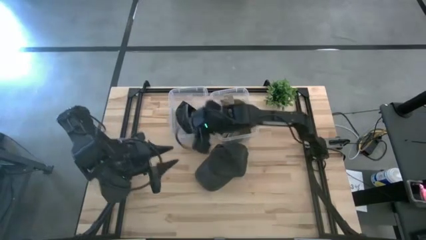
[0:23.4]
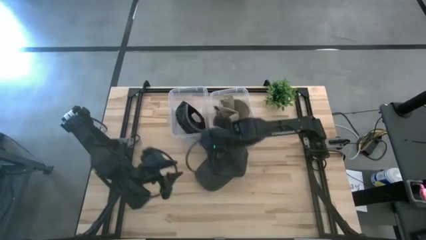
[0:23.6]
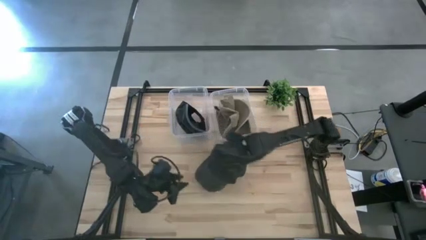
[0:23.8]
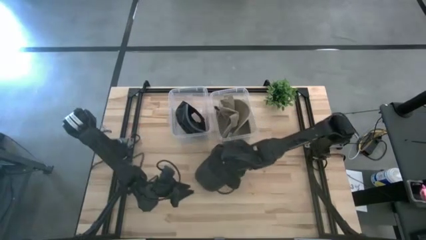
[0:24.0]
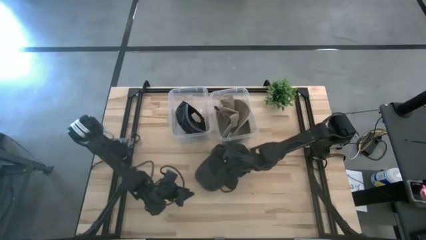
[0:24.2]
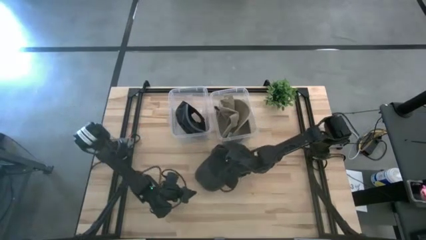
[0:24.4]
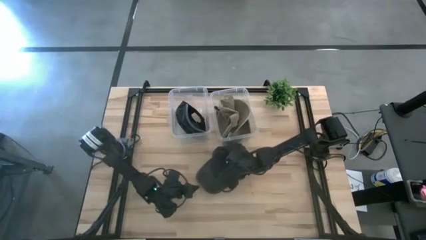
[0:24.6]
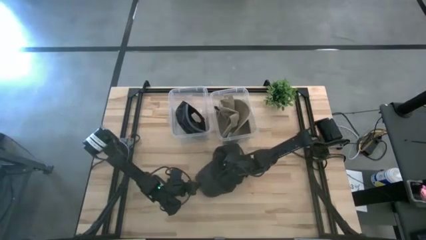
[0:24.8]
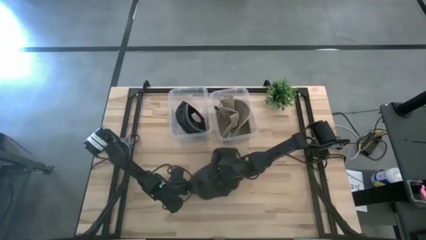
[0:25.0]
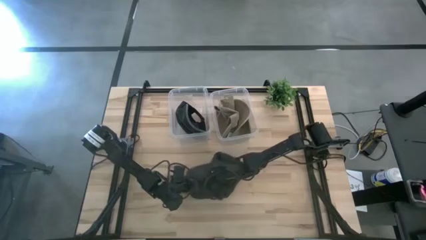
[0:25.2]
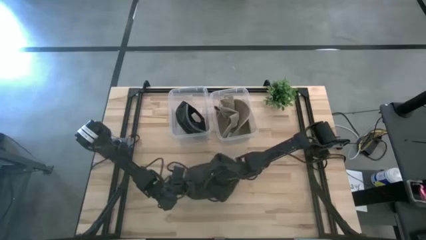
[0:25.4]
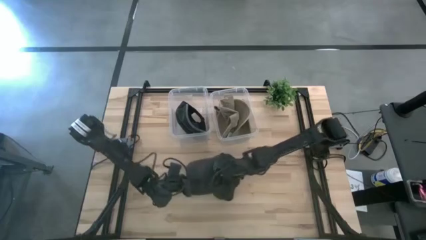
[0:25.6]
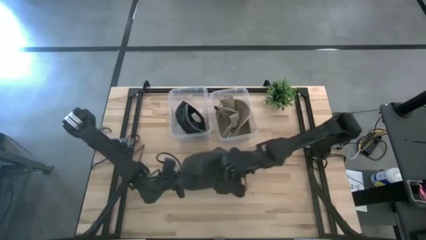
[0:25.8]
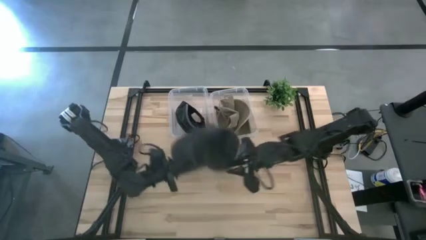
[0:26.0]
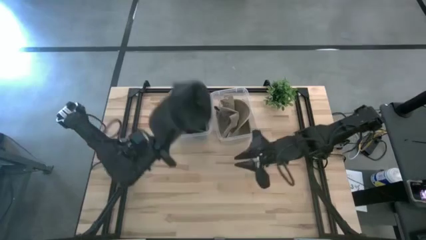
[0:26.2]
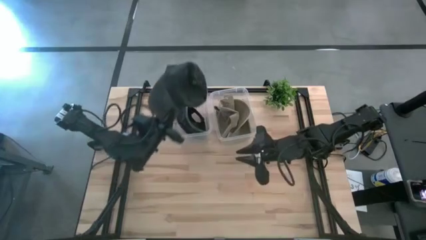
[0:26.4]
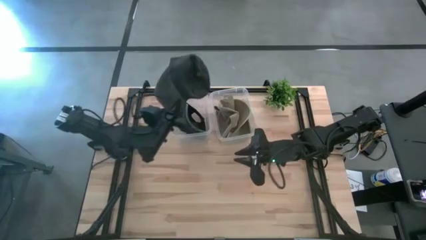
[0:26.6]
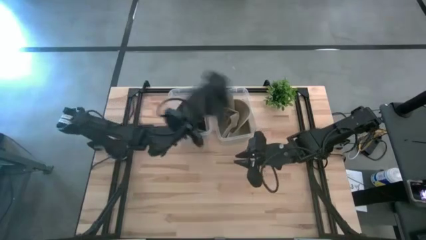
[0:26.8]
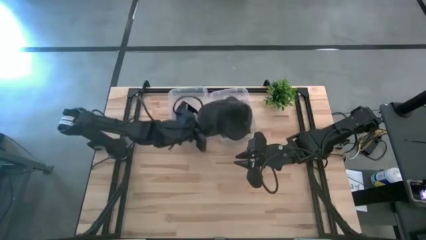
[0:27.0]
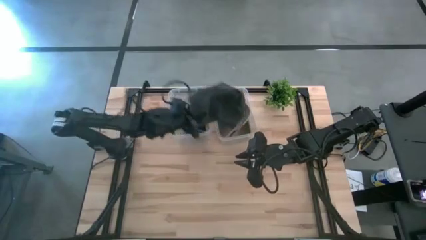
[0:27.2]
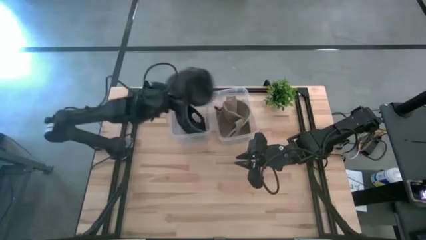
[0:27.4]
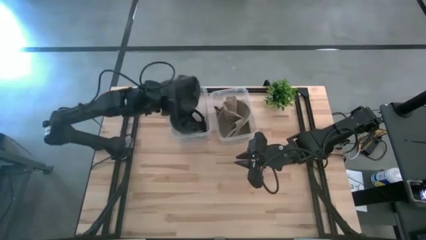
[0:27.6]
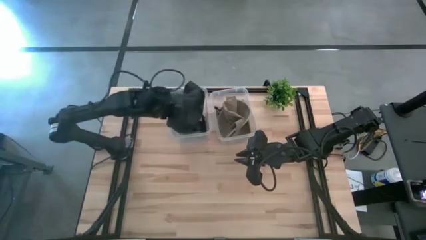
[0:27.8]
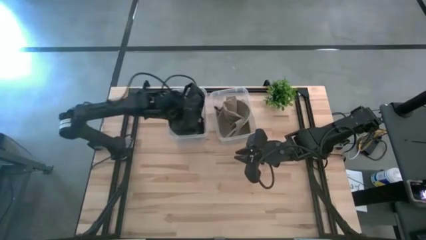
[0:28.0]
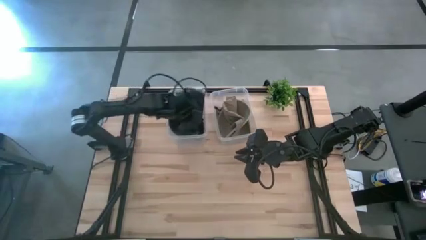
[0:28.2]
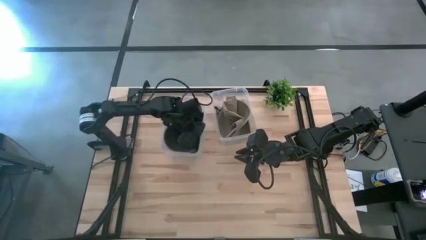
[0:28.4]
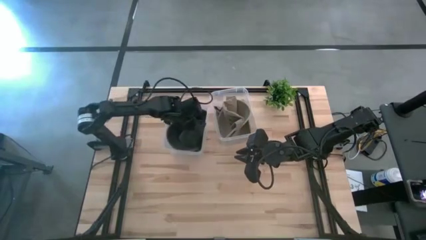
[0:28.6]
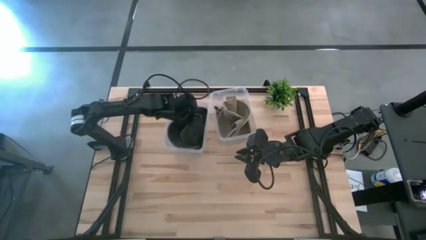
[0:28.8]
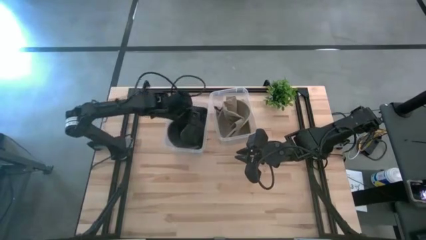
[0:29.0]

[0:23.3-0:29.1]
Task: Pick & Place hat
Put the black cap into the left transparent bin

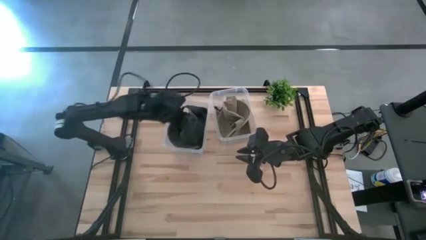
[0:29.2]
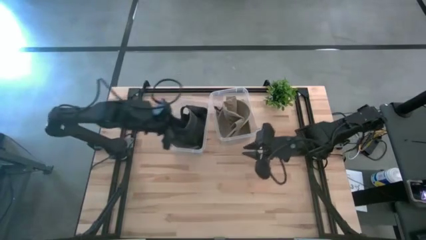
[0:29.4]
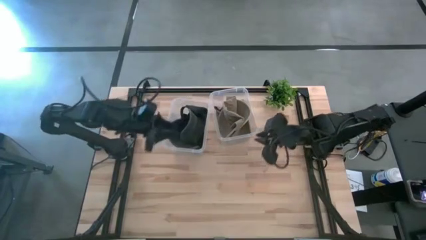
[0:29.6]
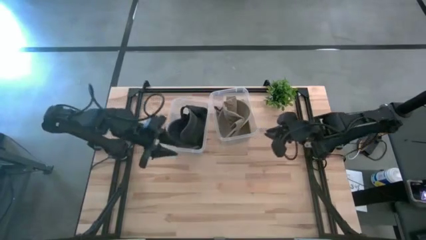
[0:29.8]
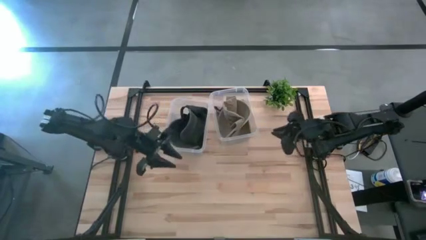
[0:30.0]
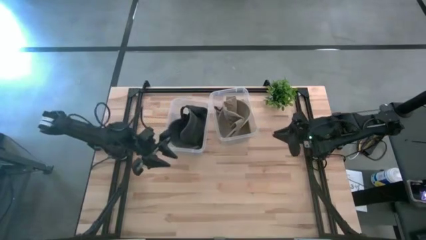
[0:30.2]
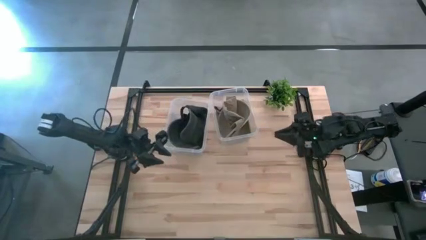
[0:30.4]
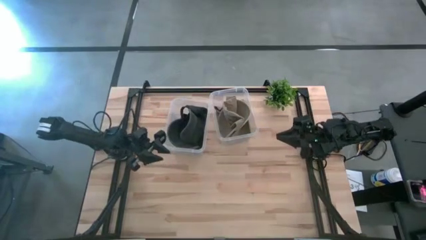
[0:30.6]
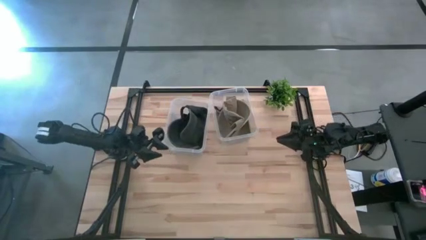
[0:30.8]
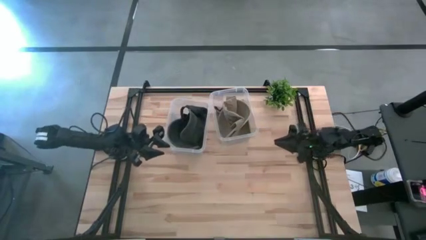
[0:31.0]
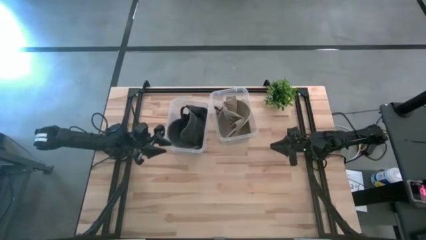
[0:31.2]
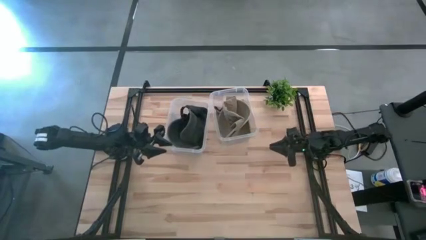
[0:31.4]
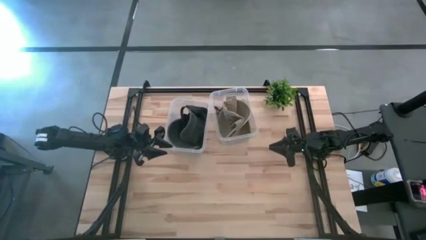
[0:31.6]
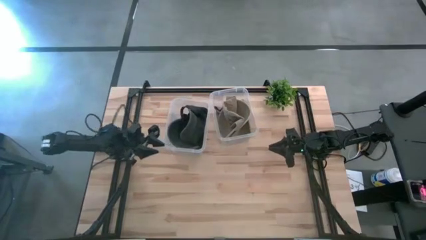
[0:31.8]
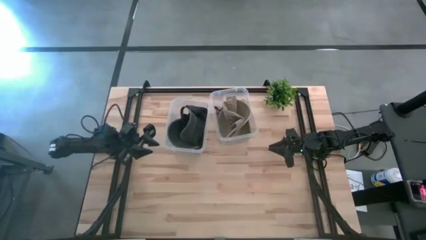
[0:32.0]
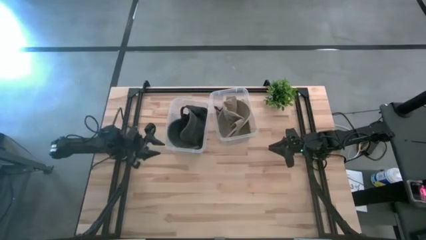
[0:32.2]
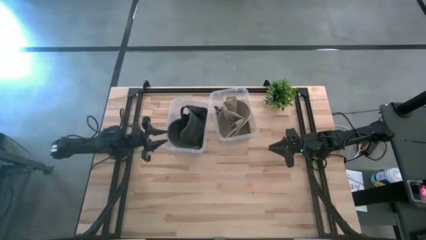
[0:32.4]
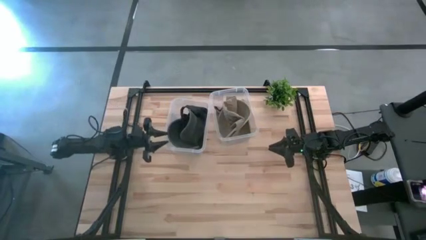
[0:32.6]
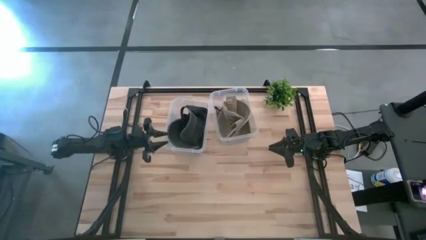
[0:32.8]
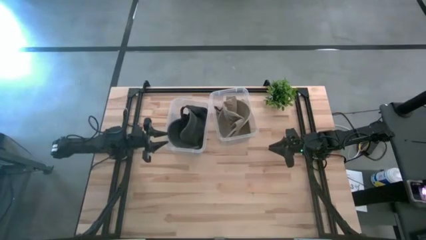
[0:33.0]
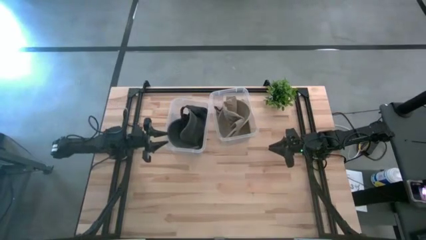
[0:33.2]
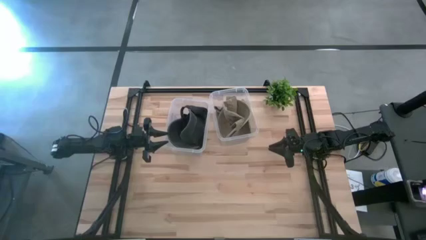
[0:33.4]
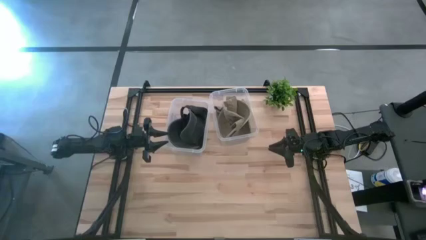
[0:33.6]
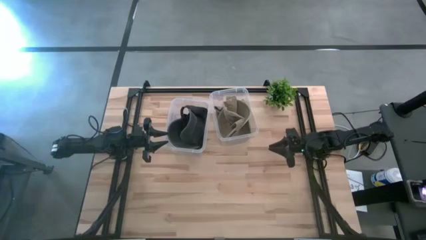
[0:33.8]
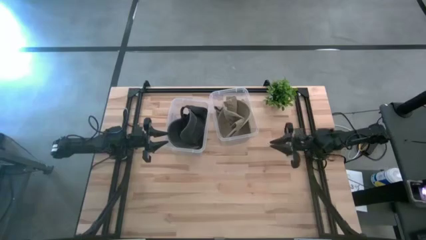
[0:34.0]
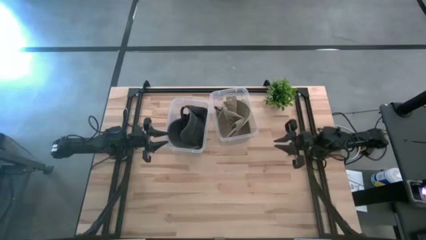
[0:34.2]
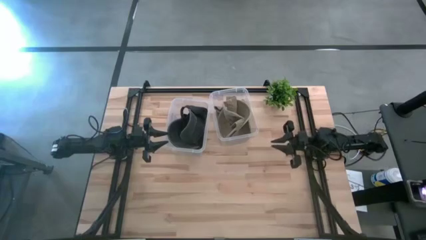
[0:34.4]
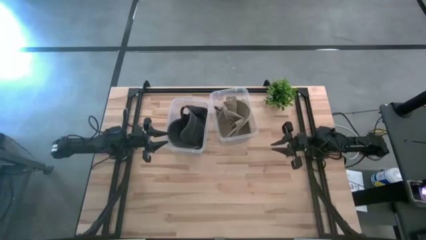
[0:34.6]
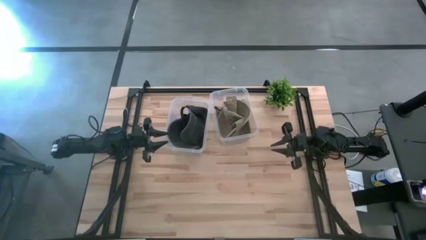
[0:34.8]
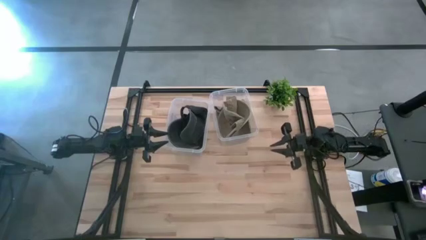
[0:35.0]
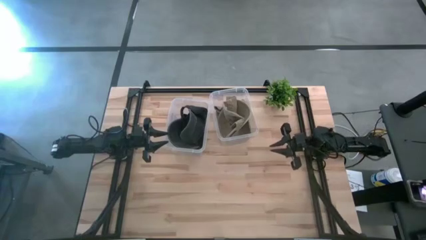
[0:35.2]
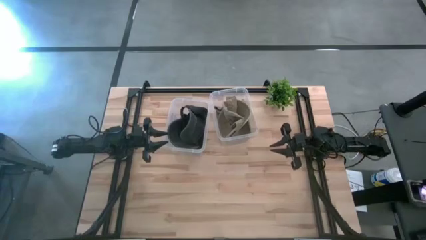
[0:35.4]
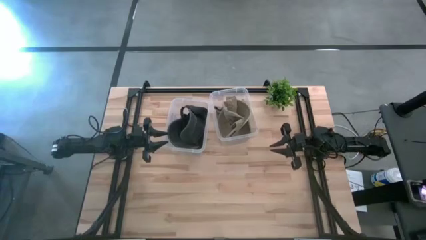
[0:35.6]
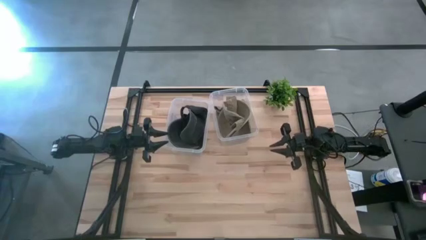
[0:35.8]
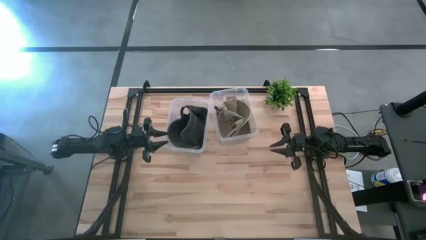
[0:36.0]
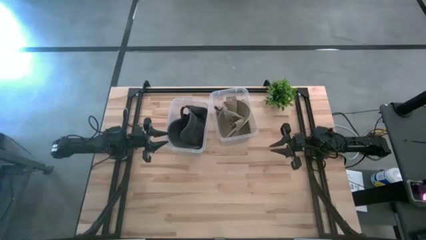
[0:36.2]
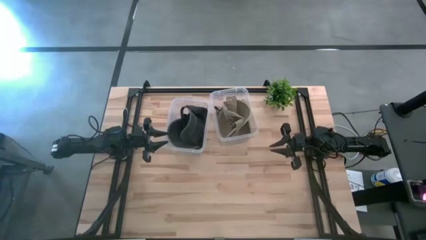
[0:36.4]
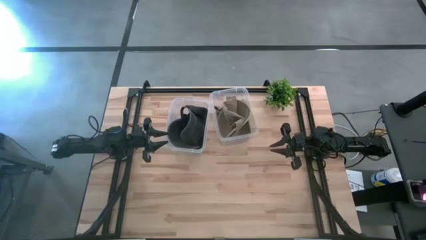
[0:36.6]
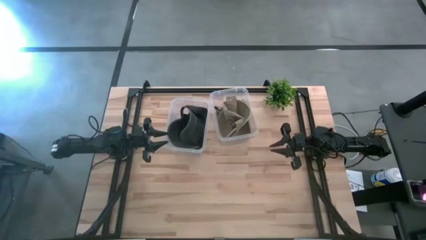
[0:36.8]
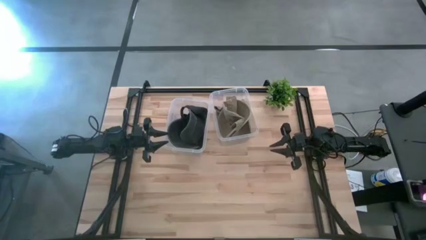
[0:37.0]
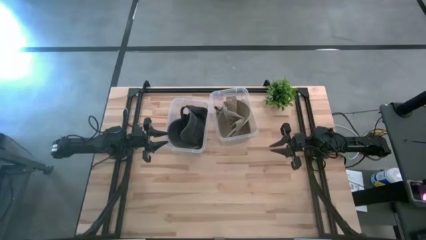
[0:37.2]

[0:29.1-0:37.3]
Return to home position

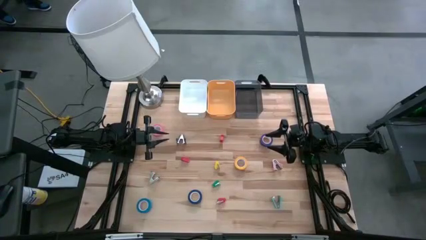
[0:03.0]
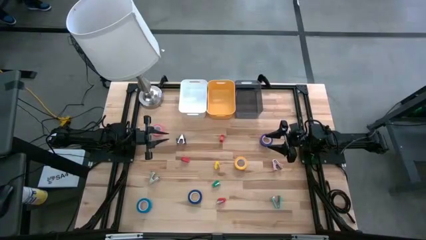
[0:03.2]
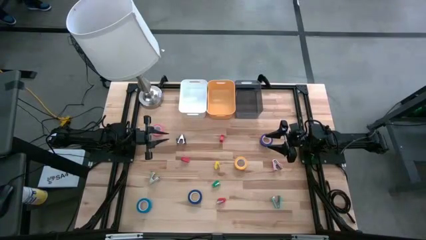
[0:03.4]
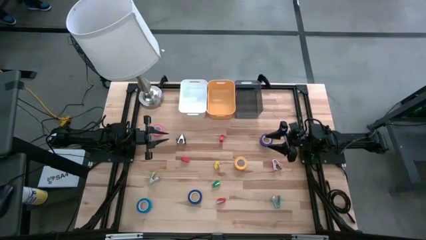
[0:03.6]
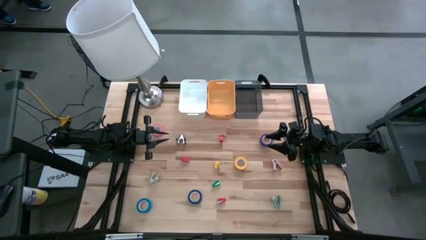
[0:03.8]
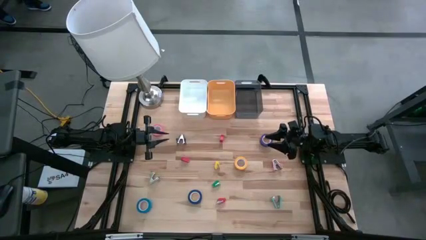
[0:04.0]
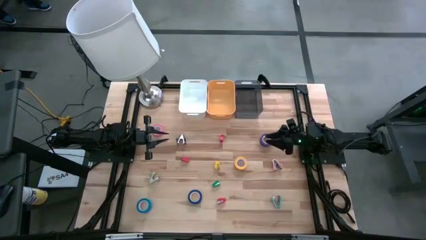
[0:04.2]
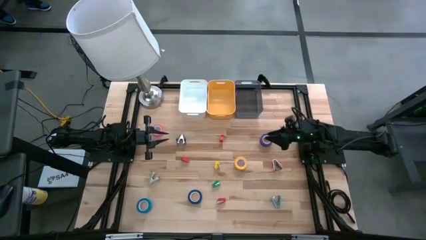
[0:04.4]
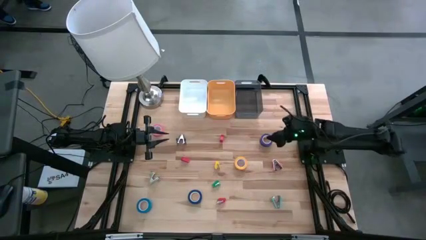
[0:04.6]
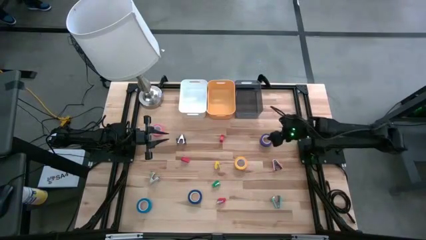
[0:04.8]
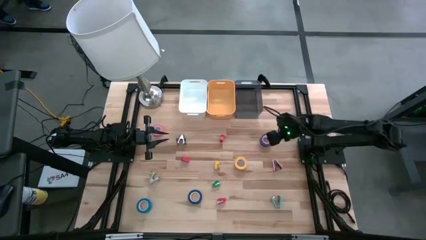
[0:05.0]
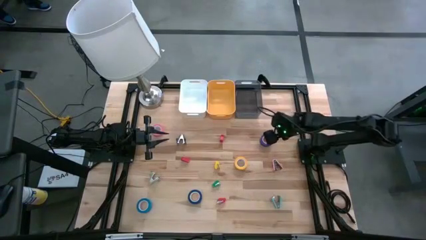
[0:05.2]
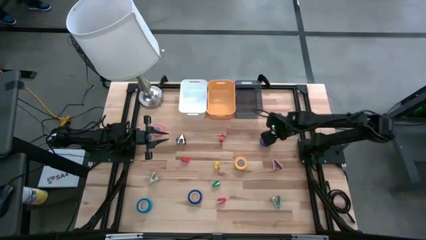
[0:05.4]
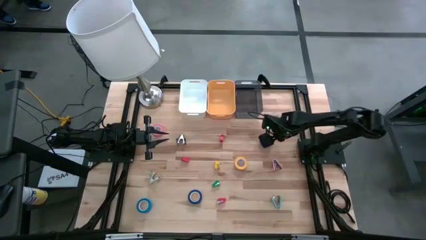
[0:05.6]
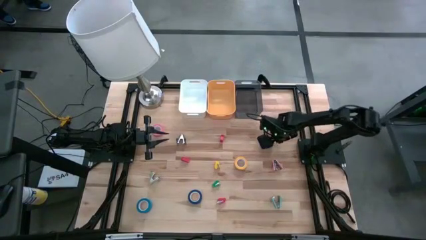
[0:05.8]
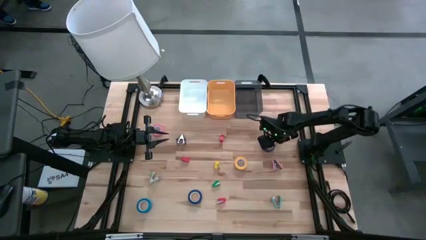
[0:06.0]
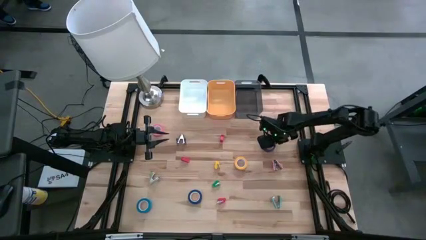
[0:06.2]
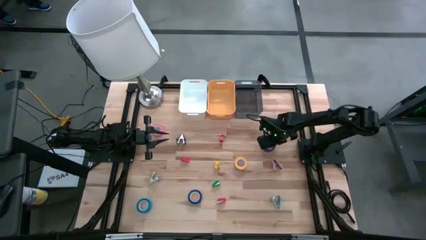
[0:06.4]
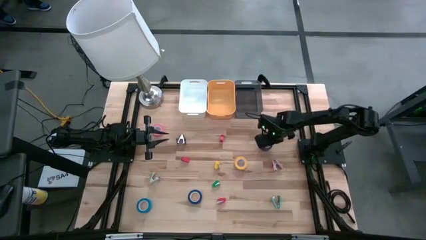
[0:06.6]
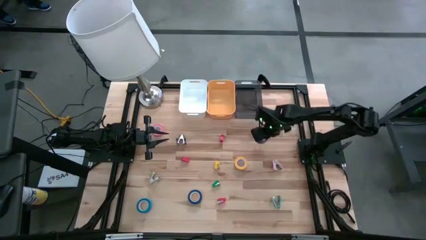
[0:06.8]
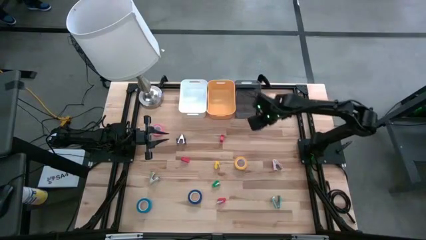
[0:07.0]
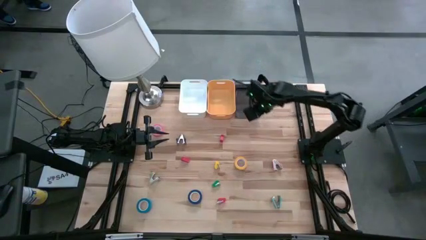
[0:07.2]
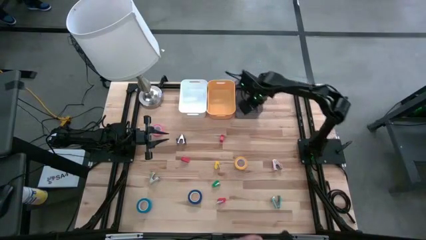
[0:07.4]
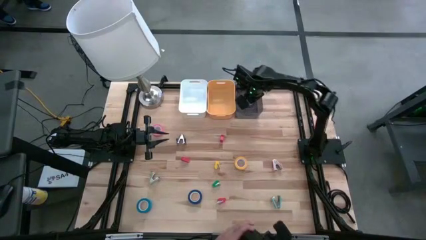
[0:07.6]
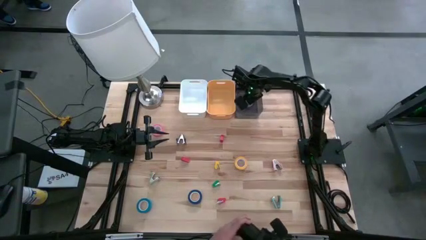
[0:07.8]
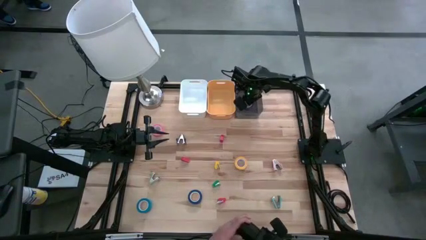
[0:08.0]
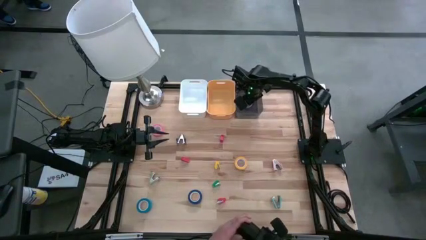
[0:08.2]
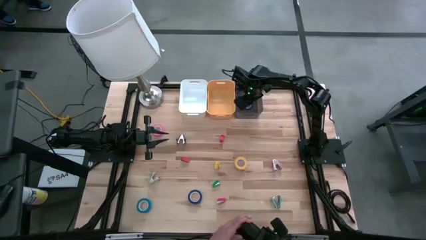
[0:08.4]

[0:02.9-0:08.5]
Task: Pick and place Stapler, Stapler remover, tape
Put the right blue tape into the black bin
